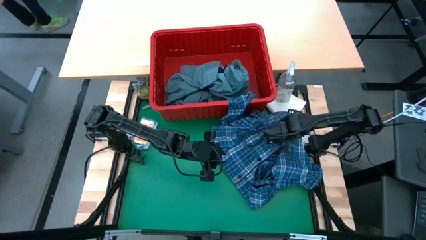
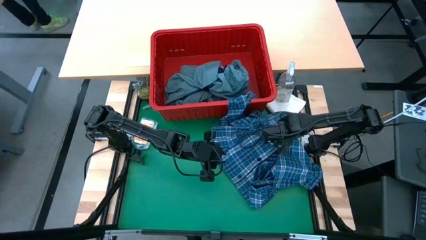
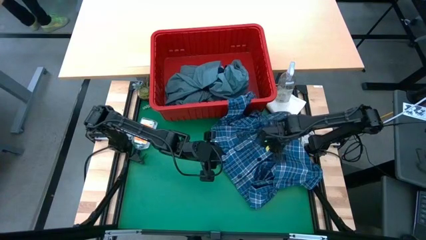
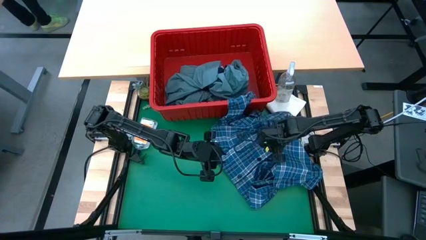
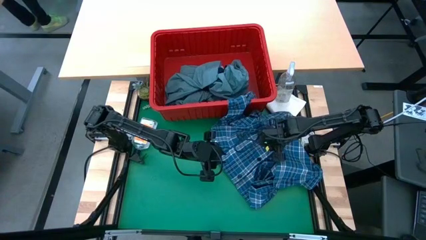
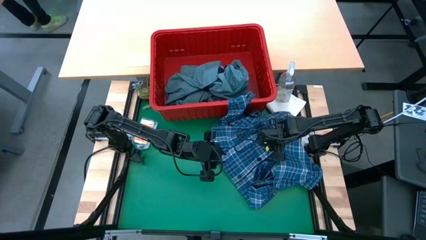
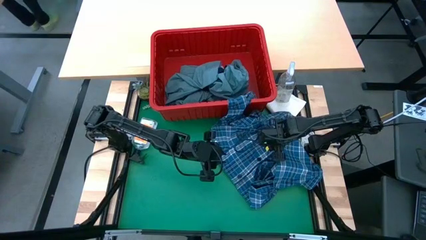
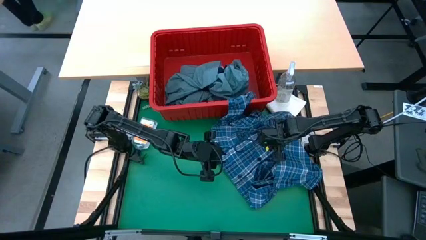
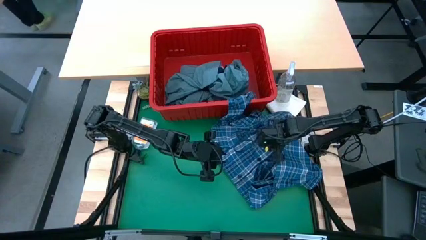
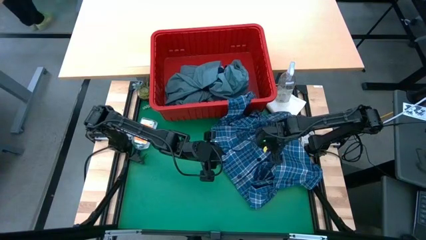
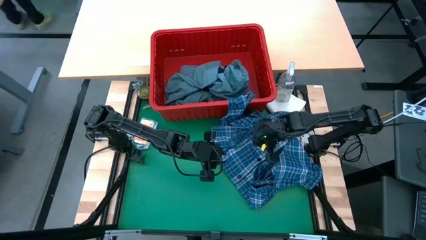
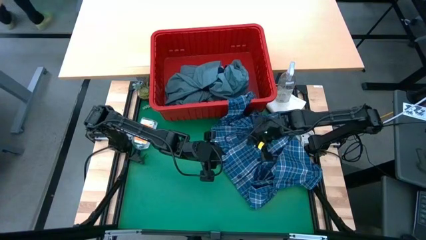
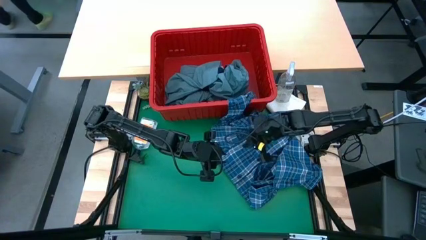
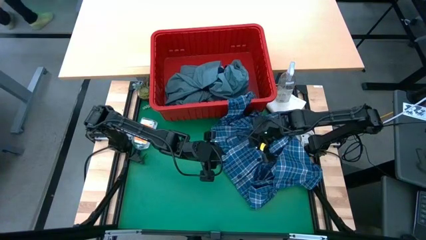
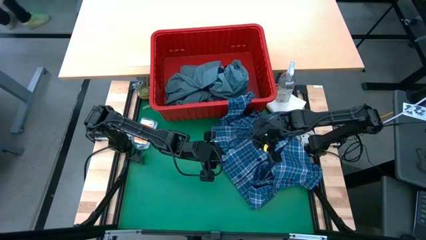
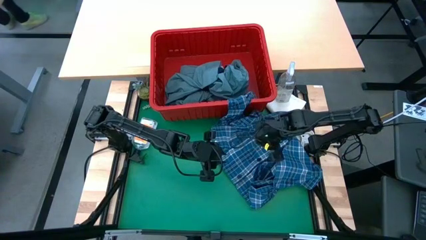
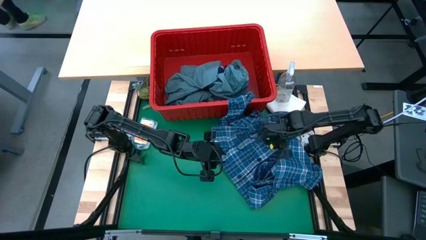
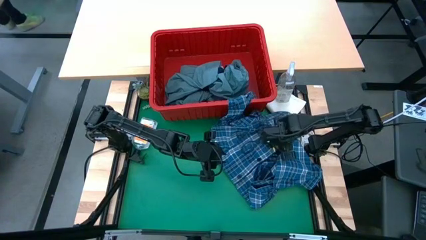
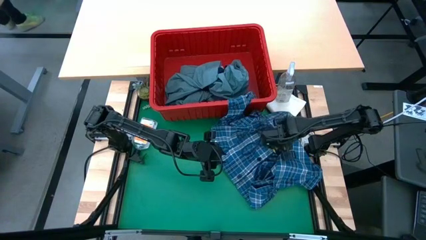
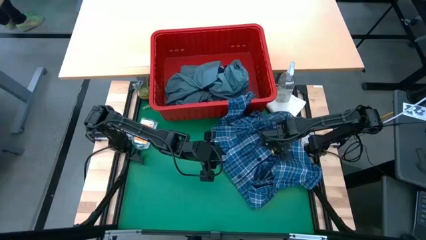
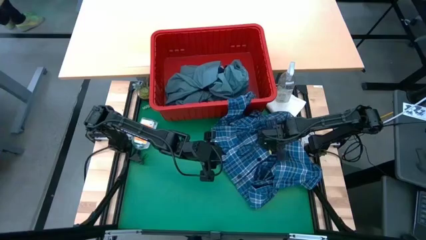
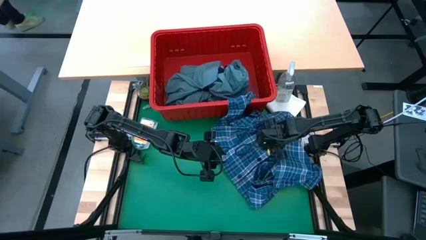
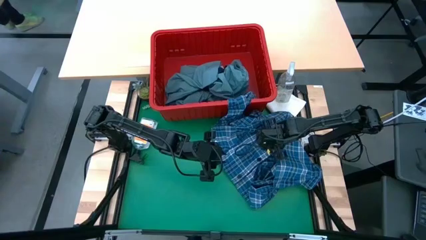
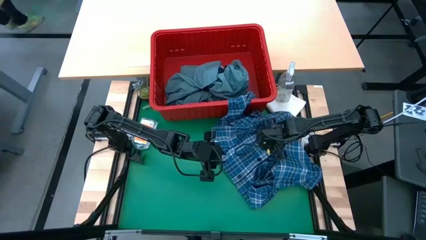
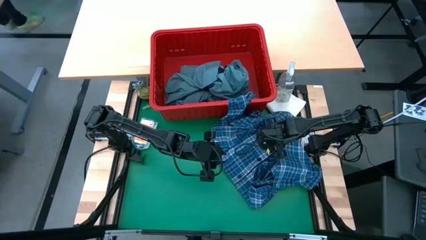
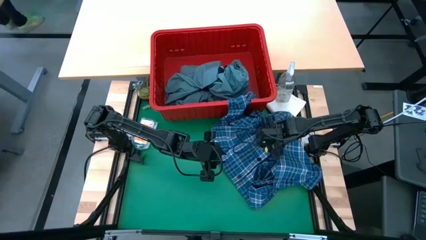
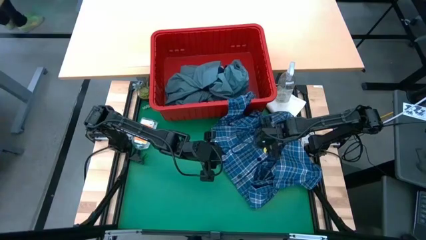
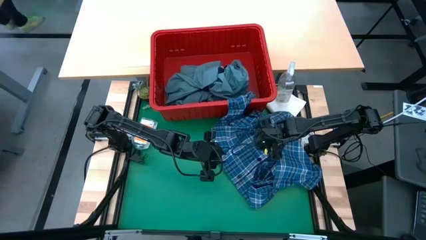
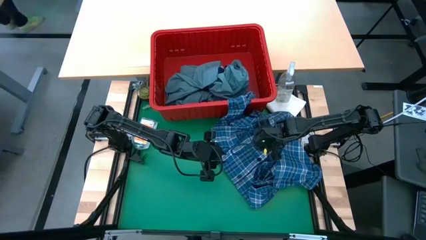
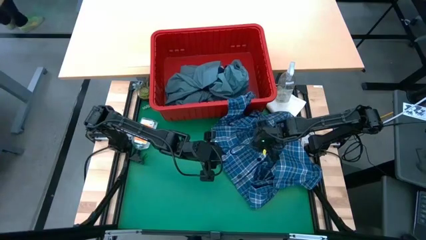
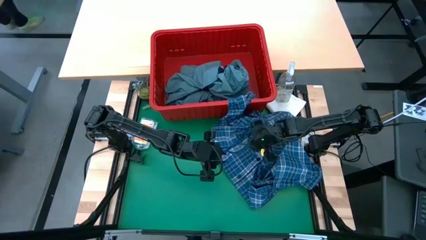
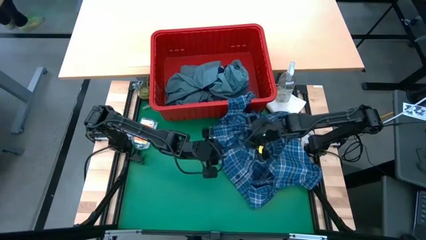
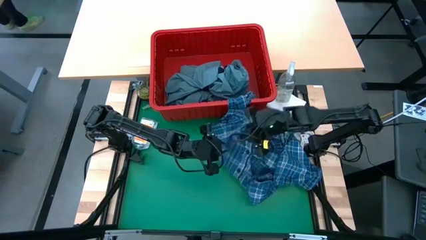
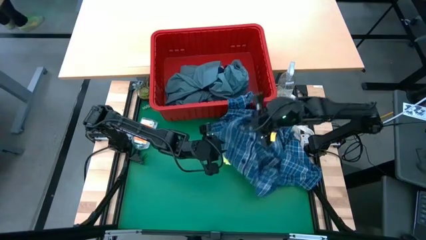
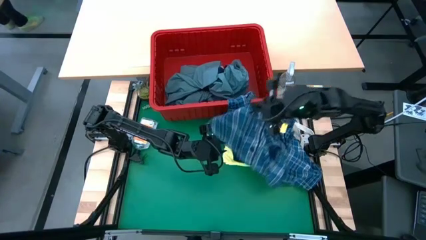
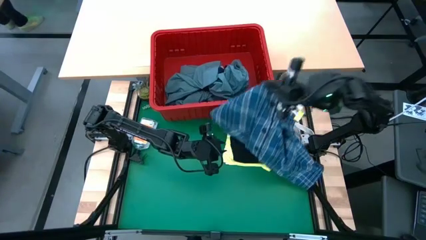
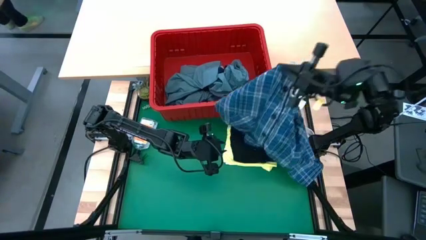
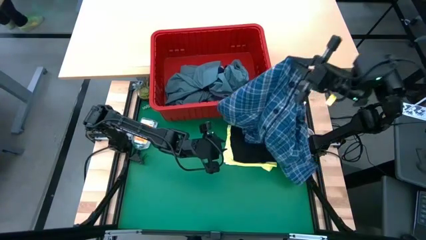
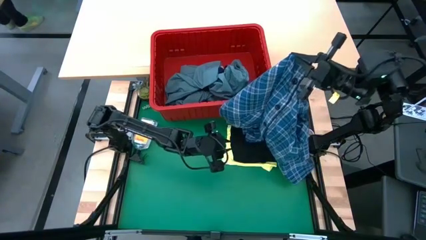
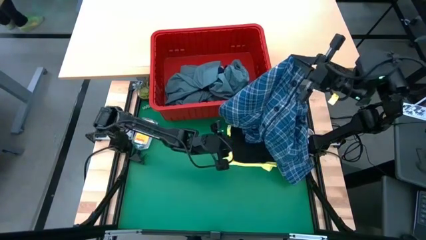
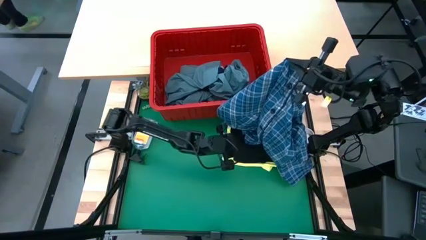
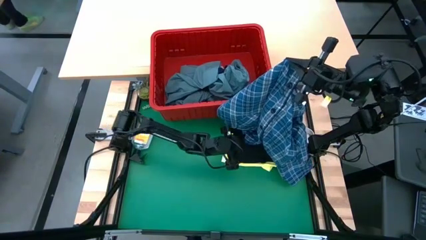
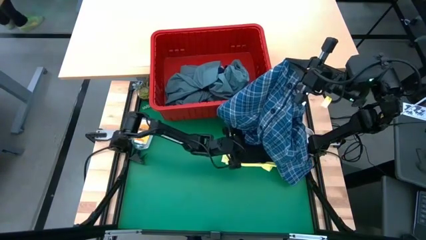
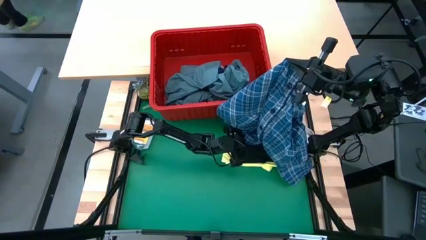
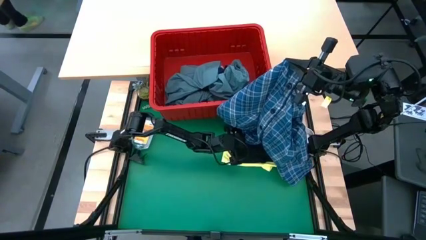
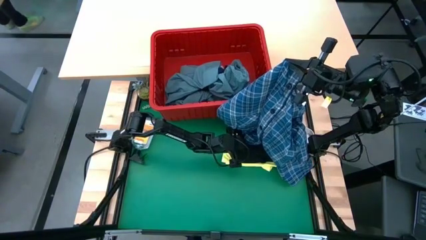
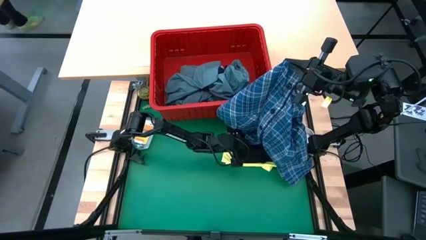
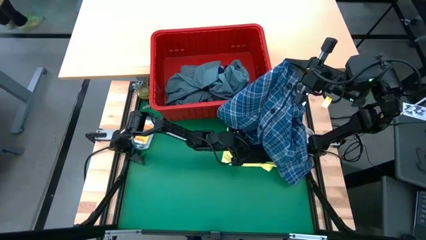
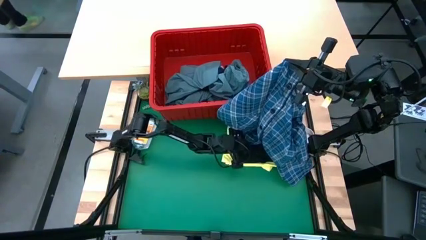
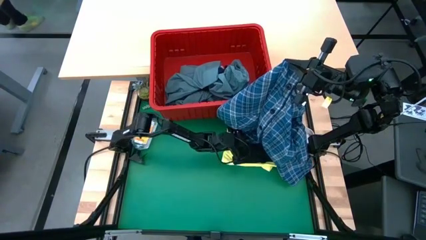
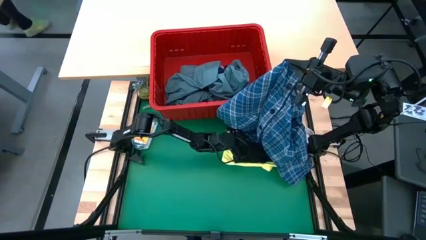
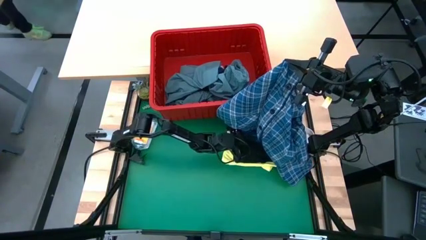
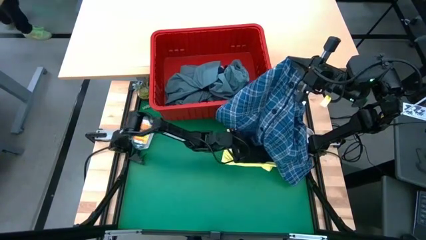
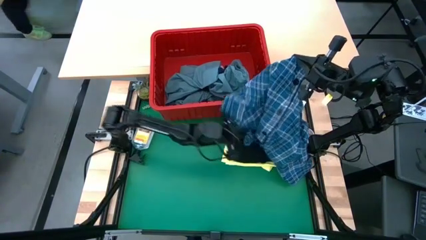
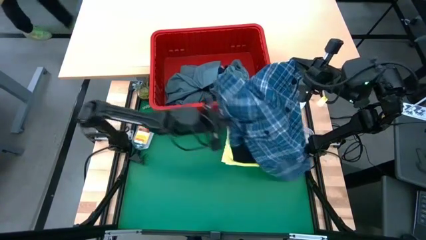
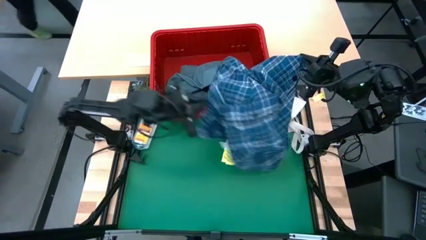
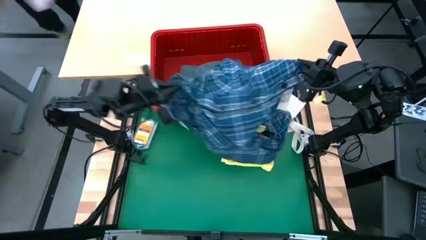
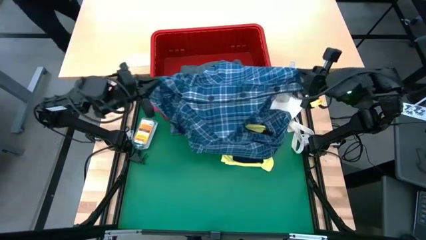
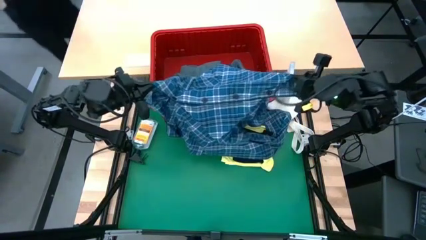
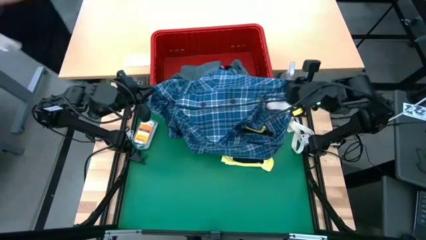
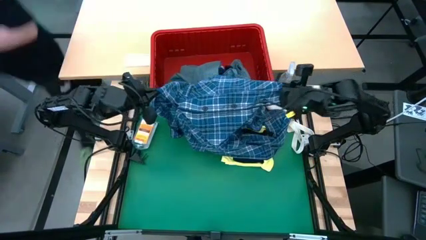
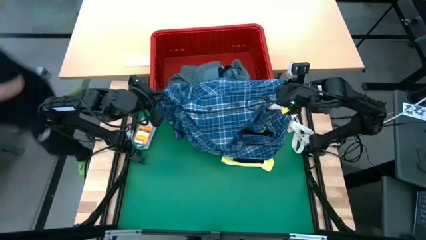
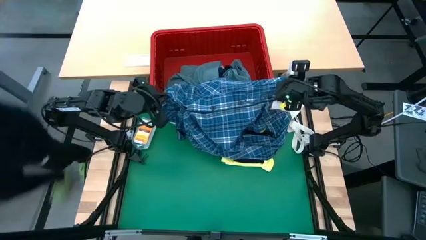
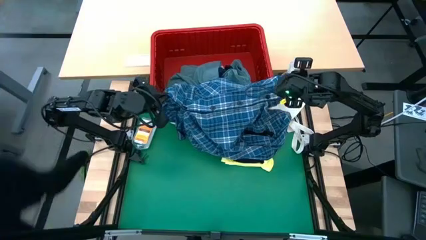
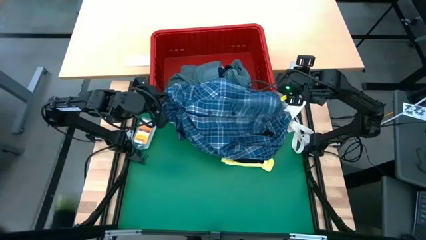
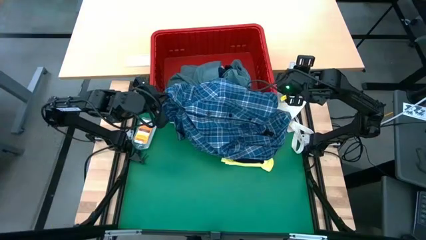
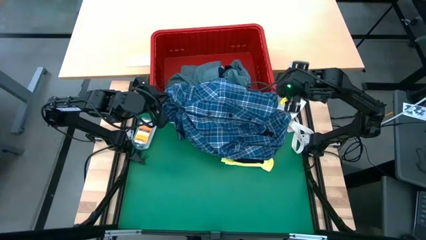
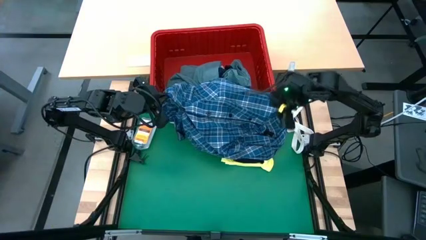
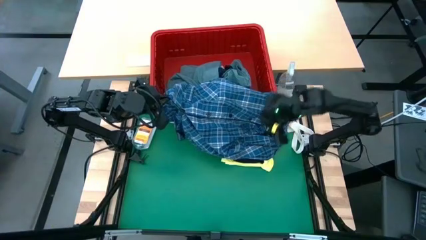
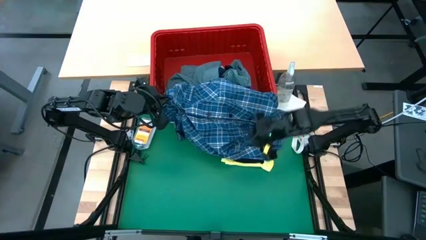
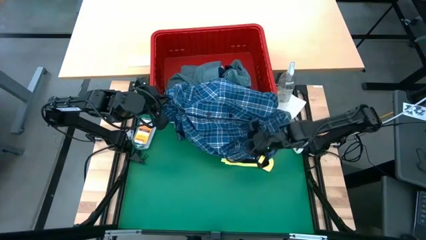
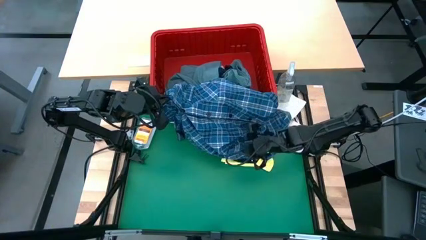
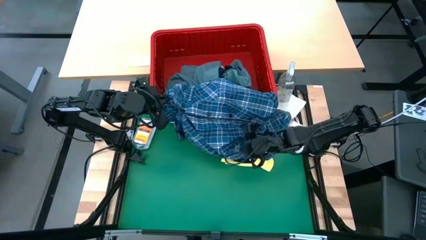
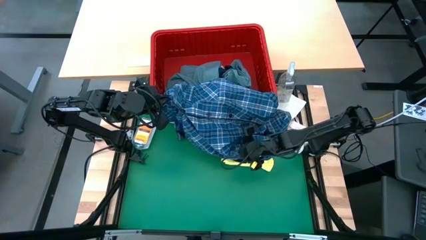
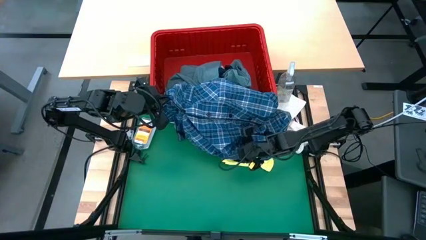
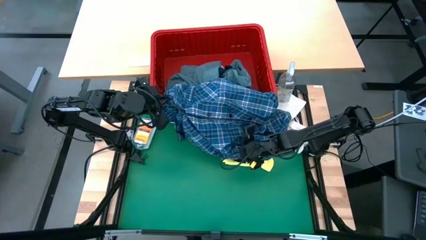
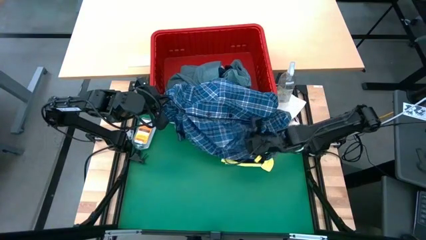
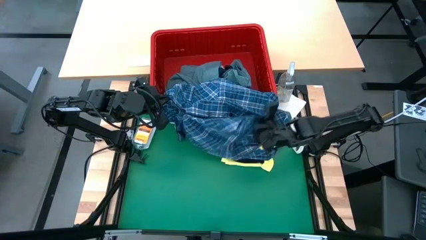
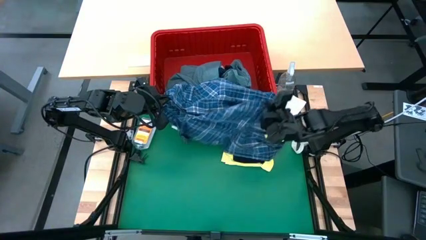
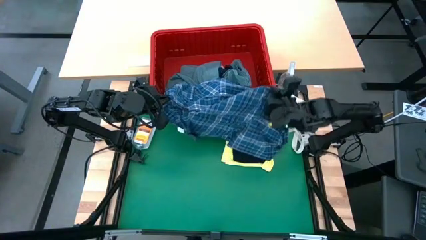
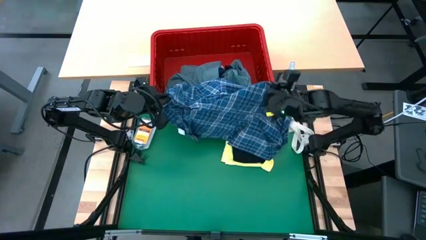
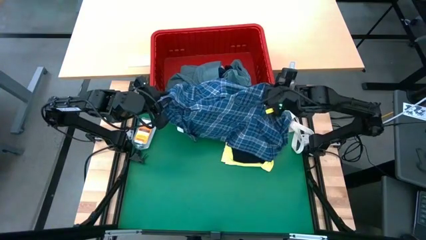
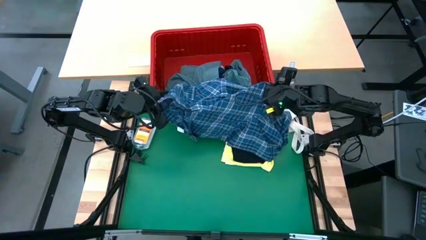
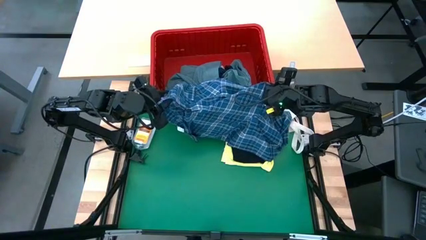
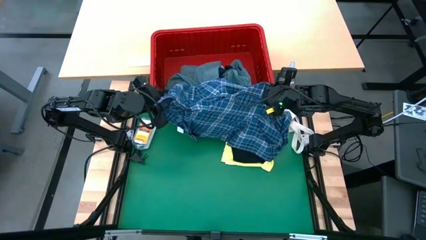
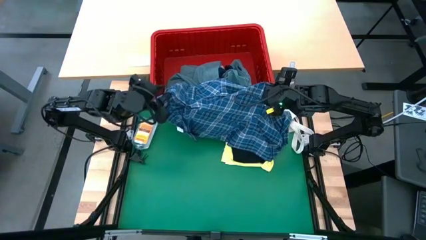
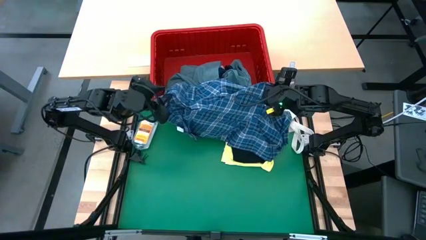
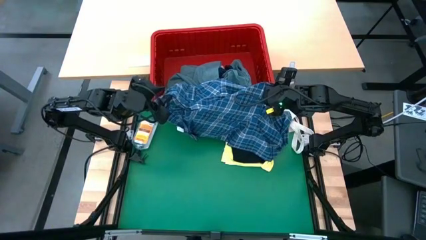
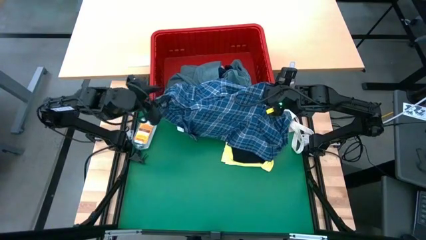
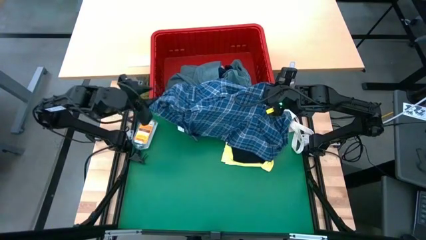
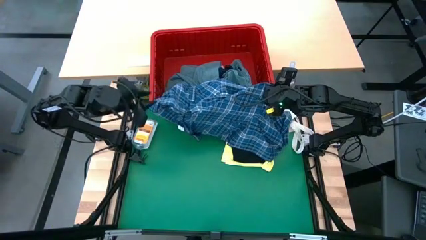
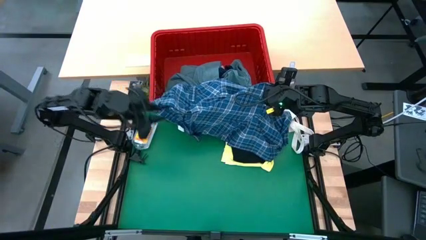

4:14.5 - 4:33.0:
Task: Fold Laundry from Bin
Fold the blue shirt
